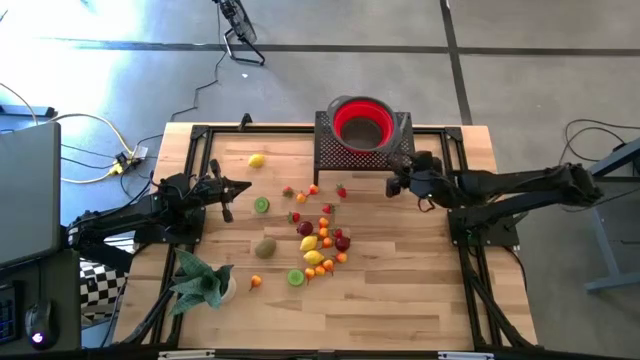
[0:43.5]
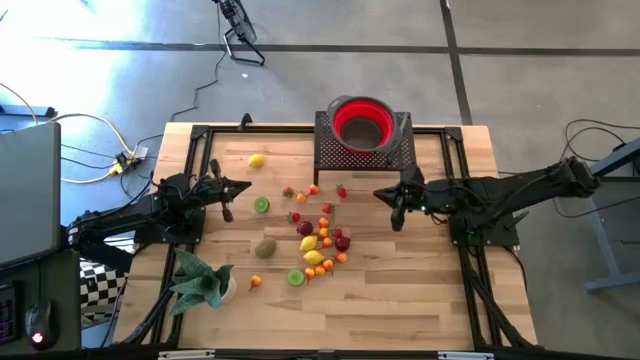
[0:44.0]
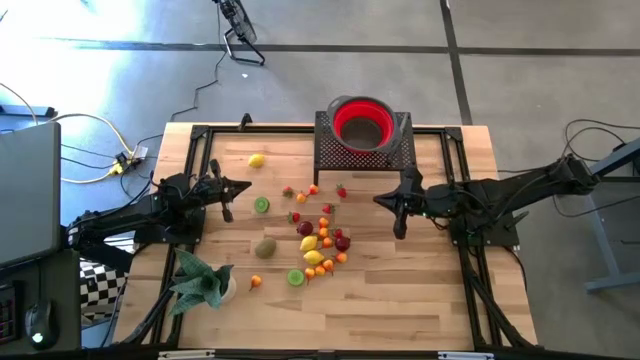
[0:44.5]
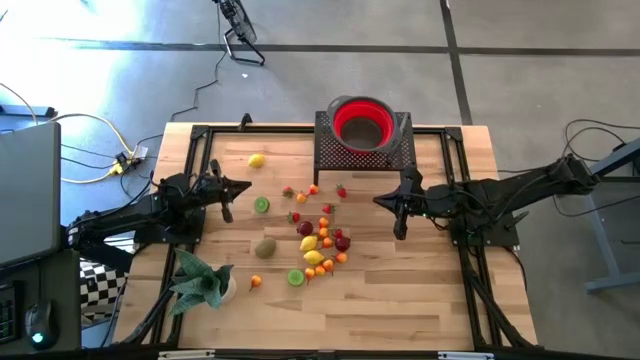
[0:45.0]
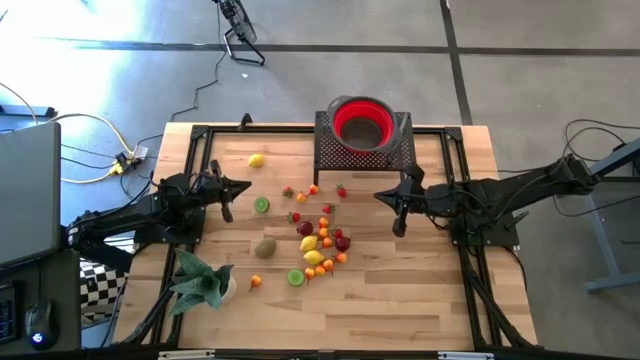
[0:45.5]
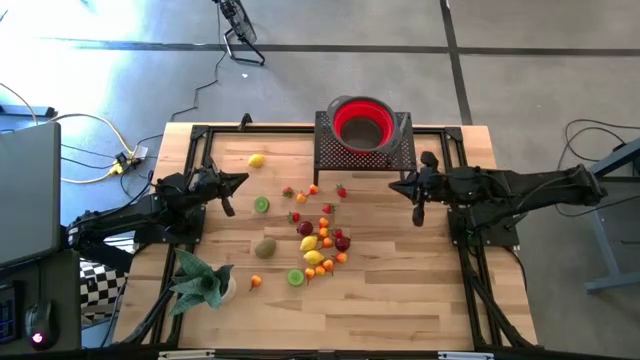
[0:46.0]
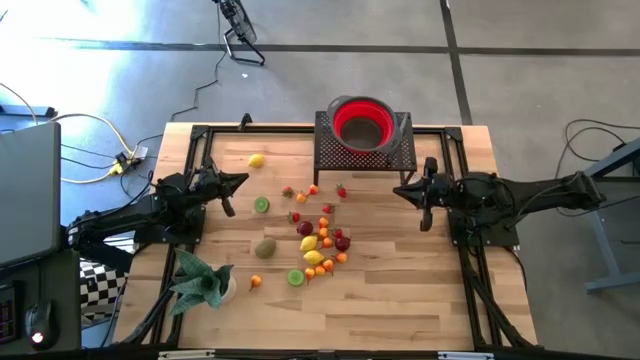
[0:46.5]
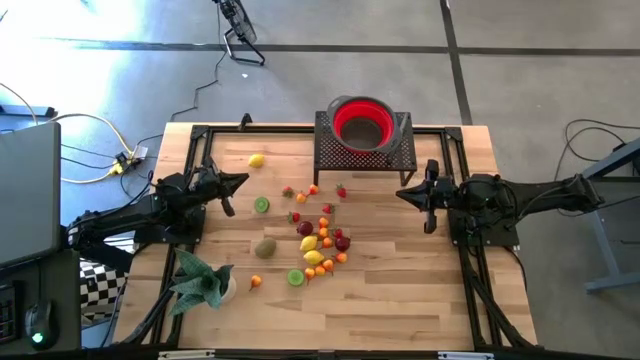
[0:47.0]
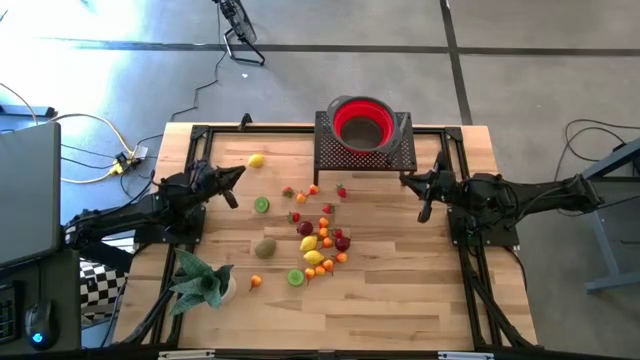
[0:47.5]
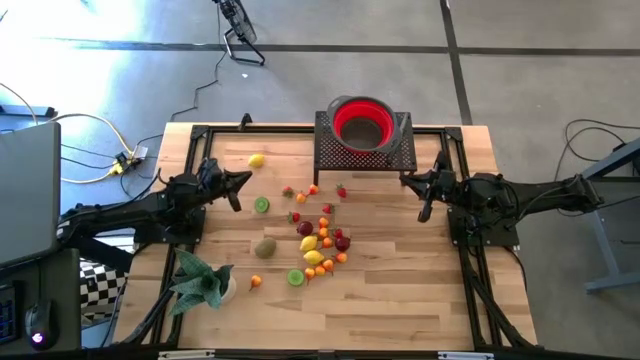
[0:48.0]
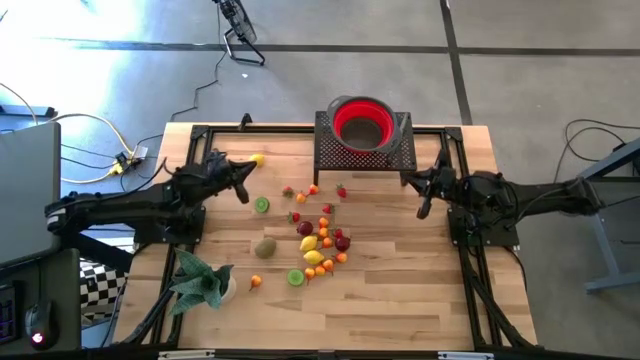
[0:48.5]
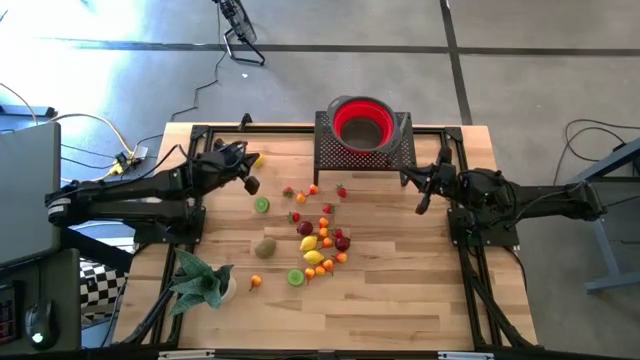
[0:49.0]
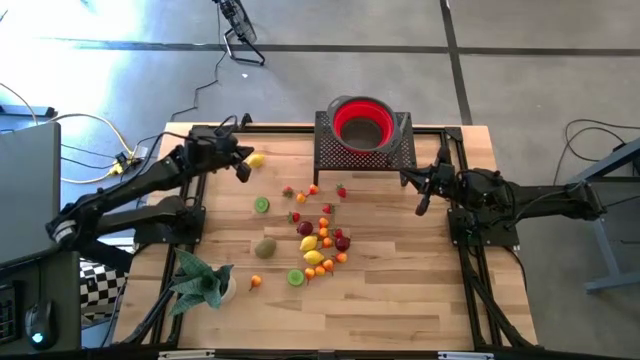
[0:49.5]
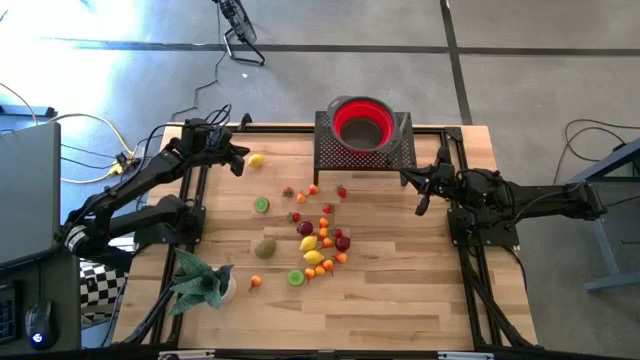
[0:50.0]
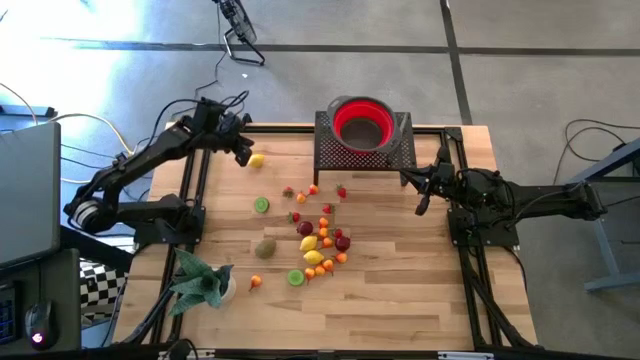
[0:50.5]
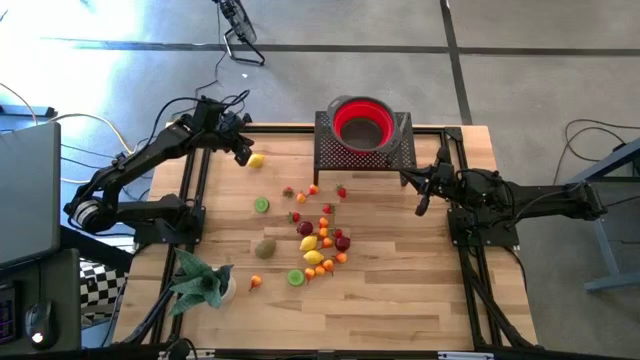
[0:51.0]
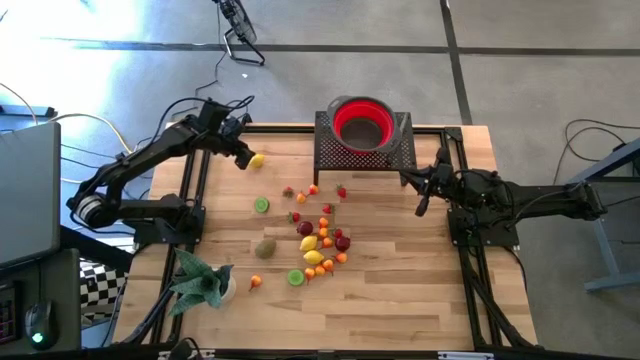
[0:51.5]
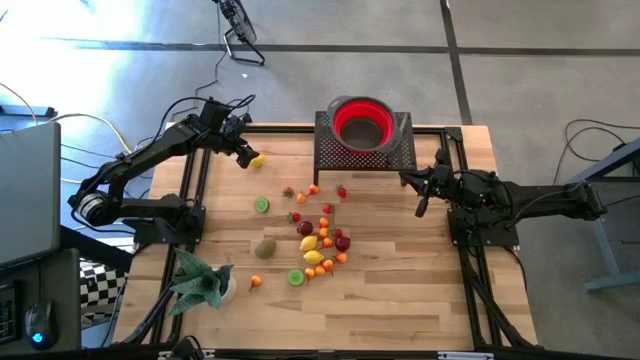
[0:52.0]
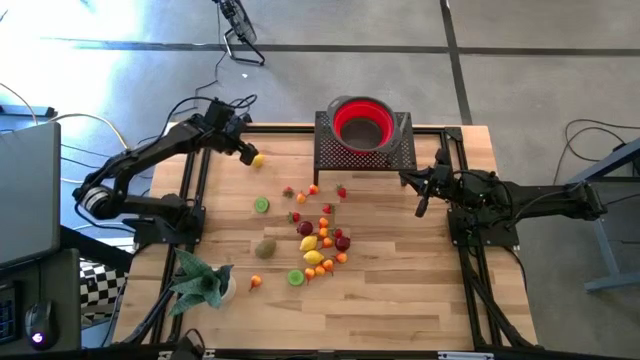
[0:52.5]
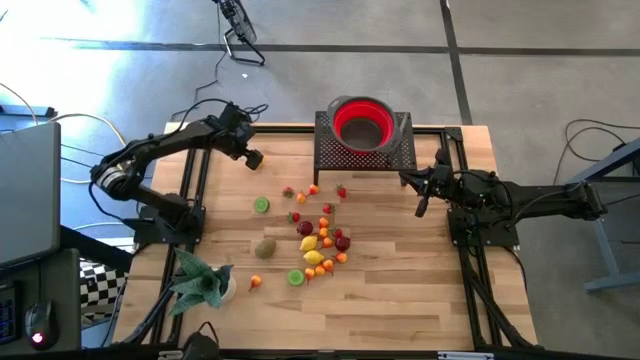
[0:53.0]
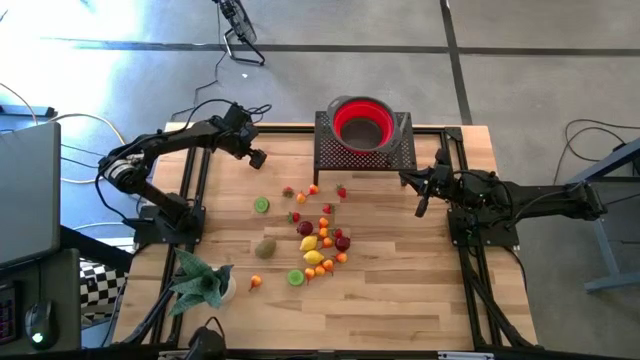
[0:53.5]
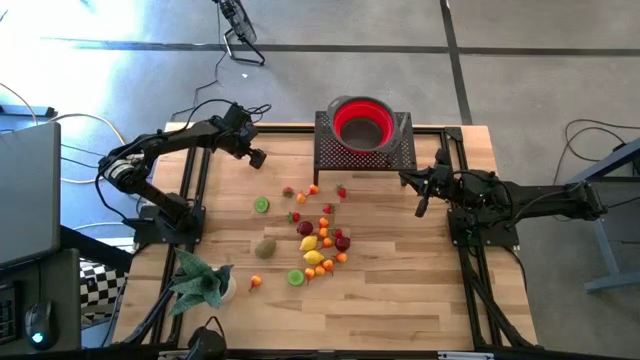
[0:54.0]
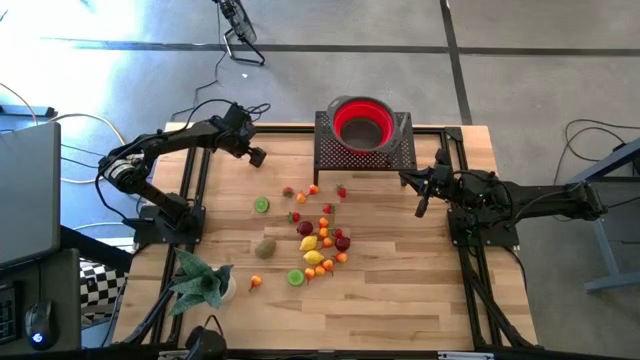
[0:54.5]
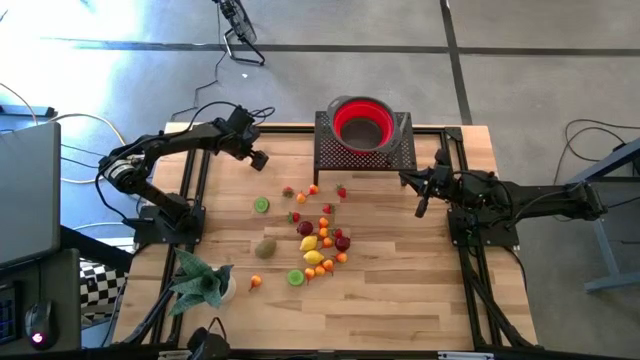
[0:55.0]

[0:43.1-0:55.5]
Task: Pick & Place Fruit
Put the lemon into the strainer on the shelf

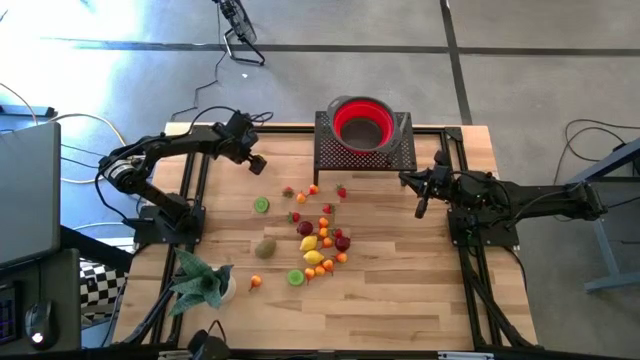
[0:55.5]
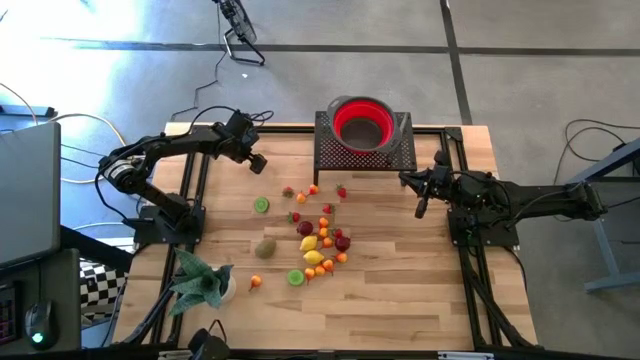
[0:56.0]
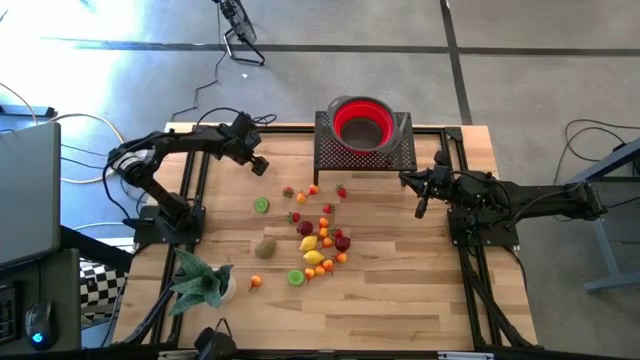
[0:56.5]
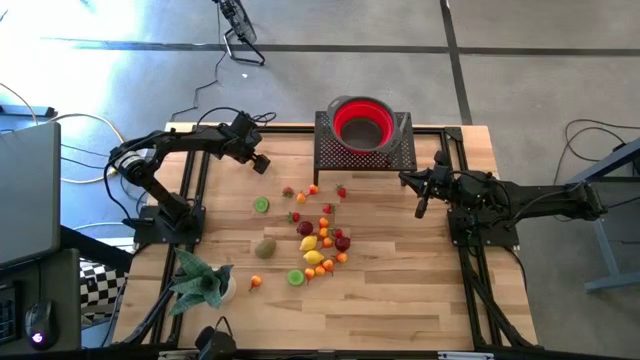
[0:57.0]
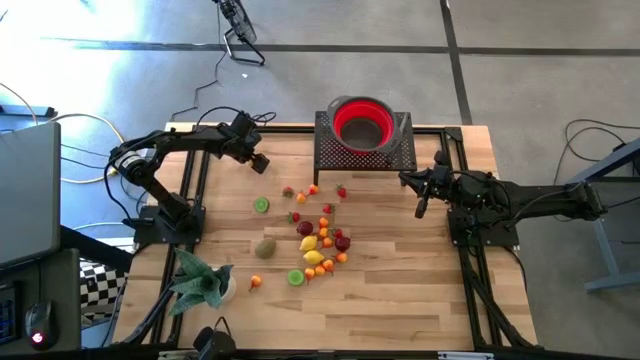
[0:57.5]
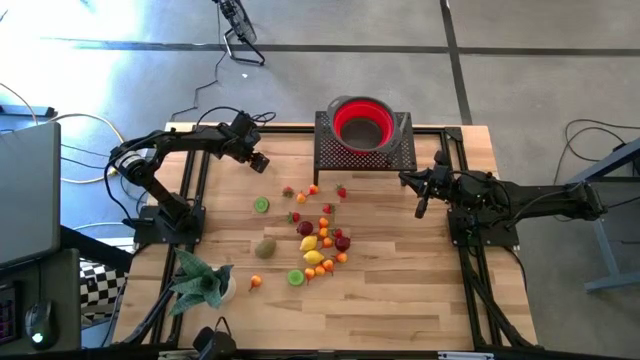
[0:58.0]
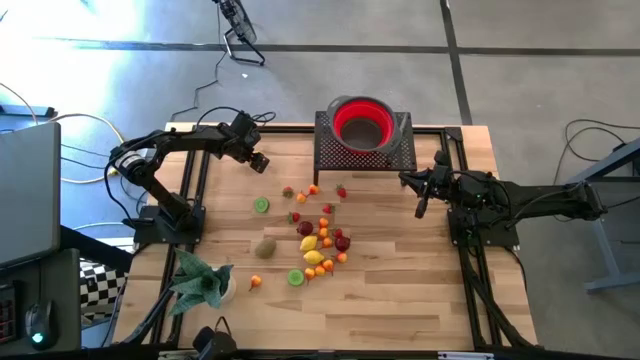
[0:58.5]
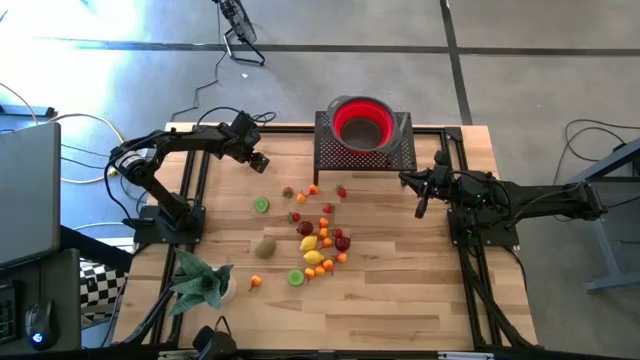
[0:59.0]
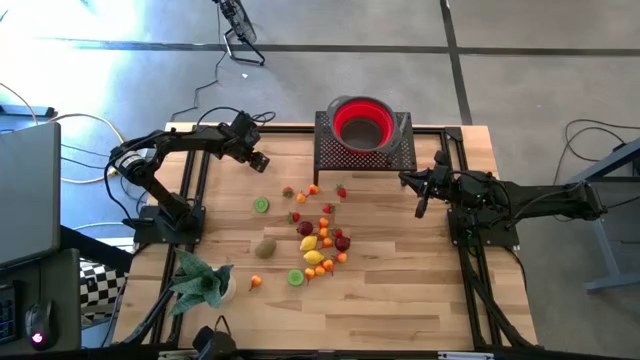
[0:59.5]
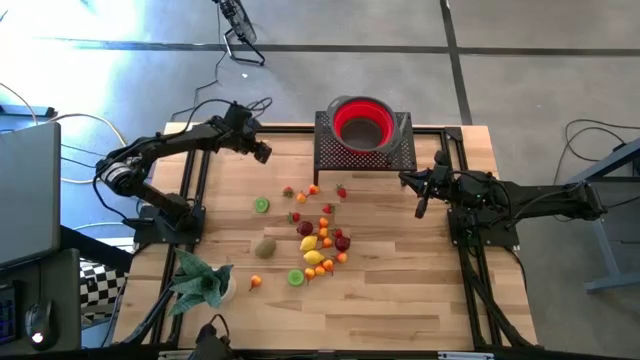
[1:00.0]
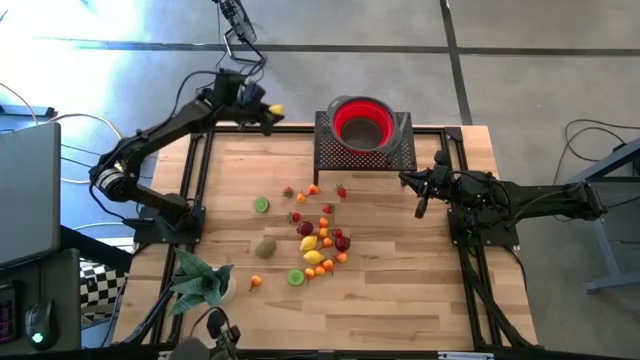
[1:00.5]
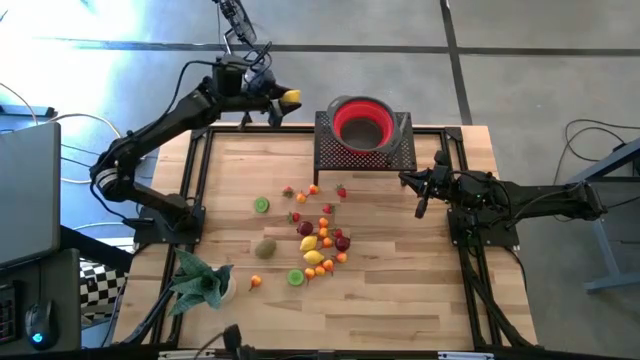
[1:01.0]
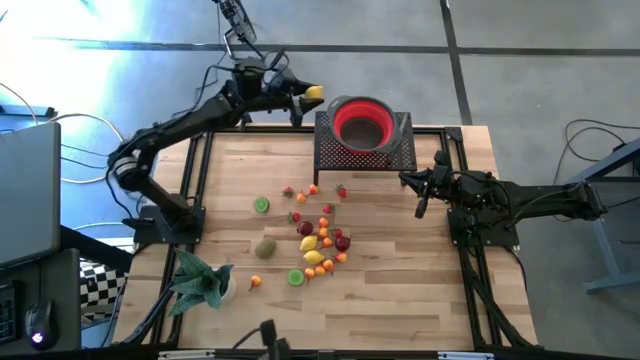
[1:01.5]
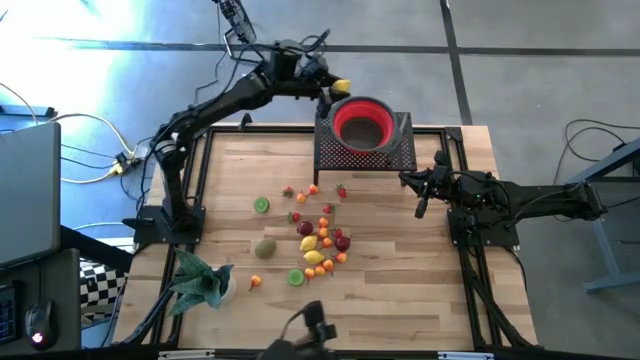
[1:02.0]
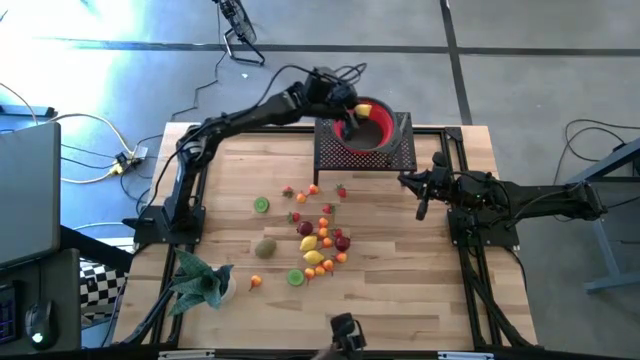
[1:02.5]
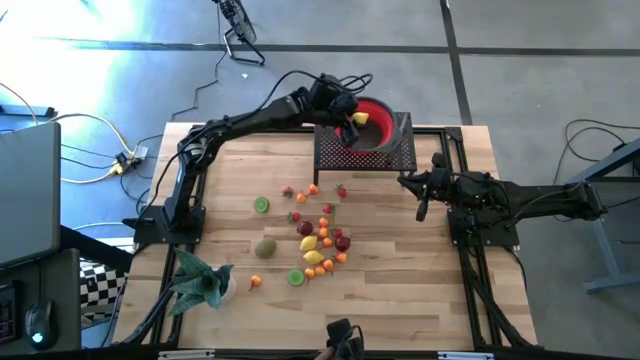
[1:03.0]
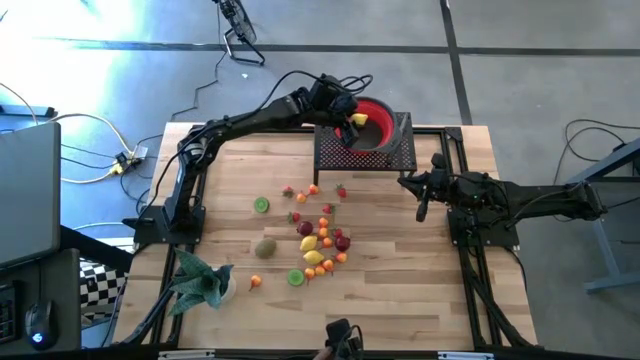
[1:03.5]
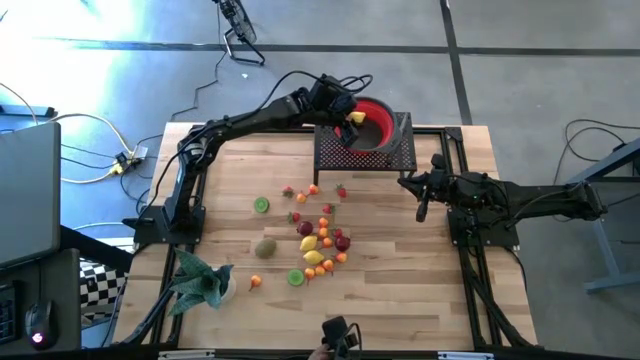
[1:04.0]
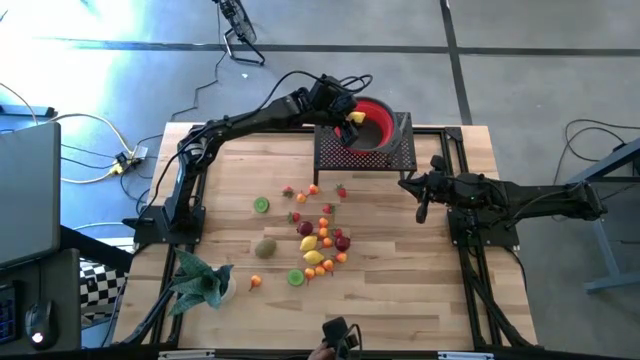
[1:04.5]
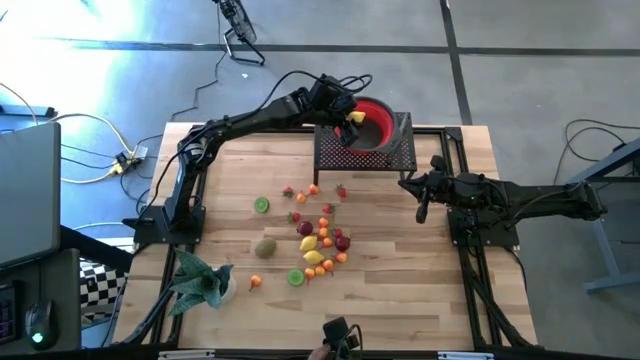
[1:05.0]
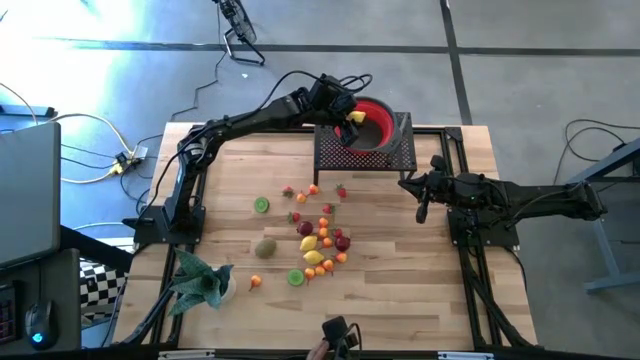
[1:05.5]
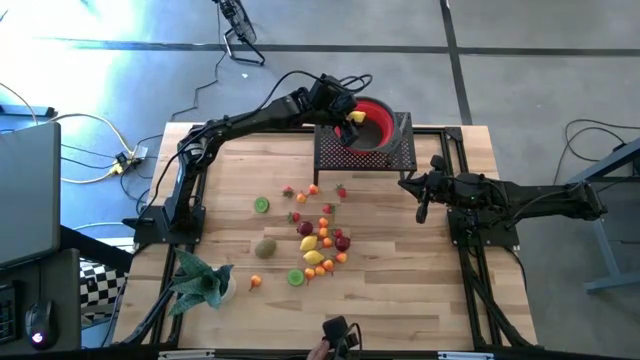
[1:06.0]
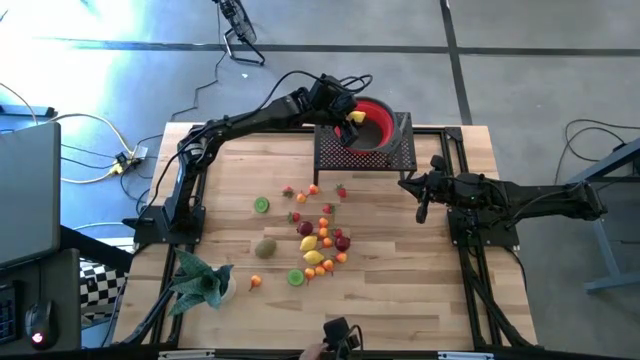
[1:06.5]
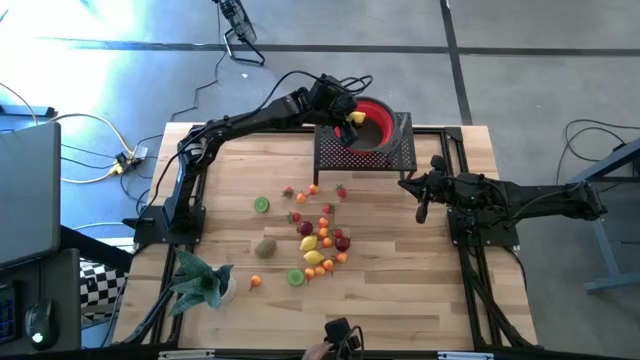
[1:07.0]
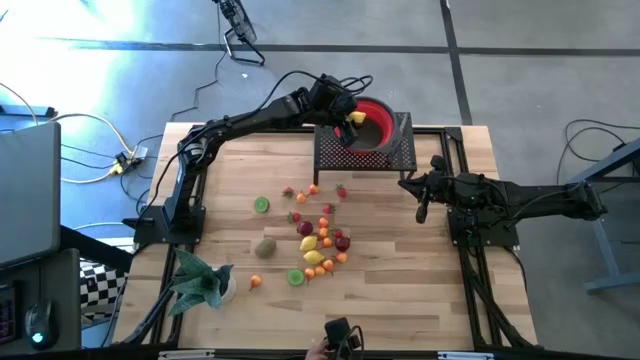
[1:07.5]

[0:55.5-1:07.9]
Put the lemon into the strainer on the shelf
